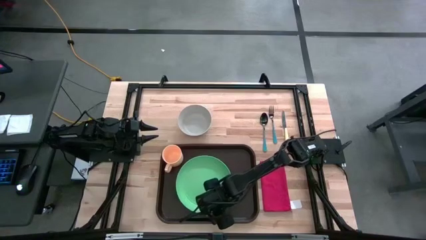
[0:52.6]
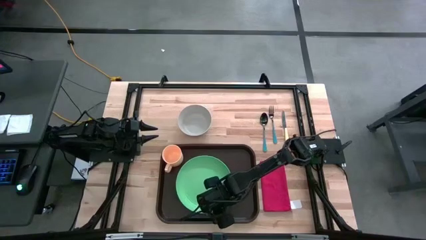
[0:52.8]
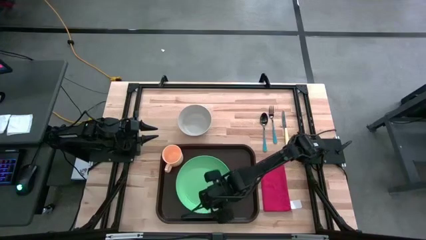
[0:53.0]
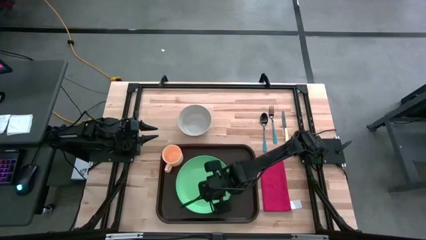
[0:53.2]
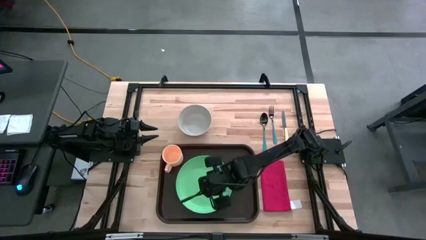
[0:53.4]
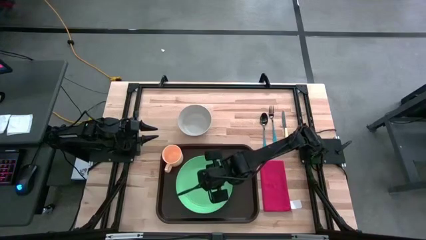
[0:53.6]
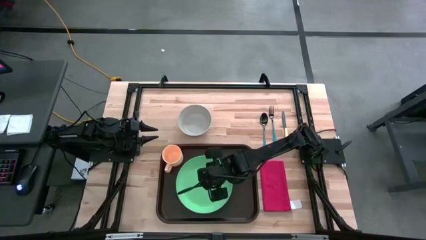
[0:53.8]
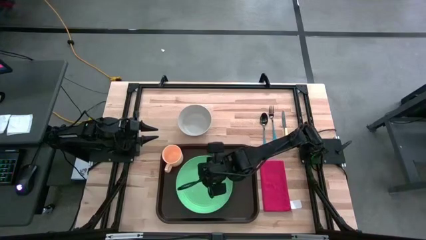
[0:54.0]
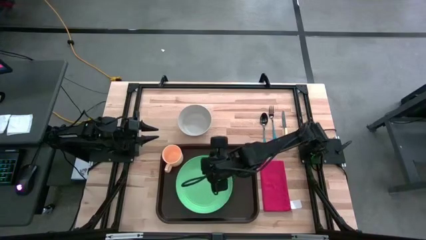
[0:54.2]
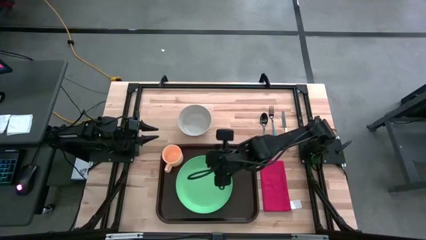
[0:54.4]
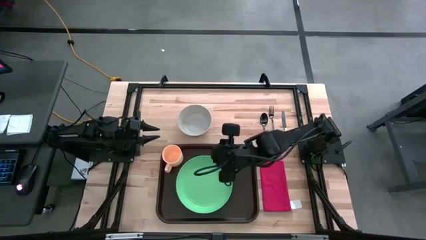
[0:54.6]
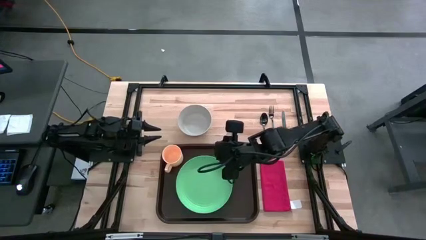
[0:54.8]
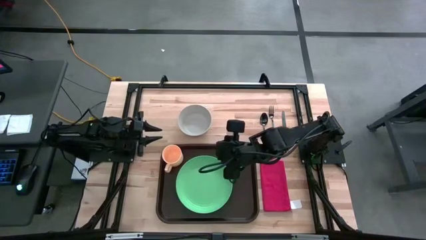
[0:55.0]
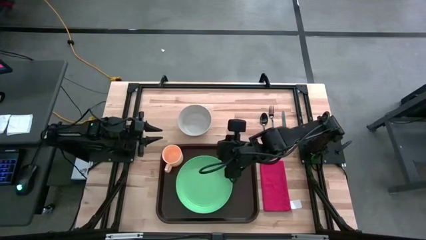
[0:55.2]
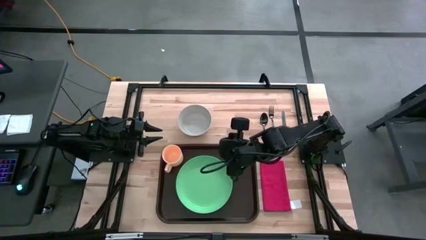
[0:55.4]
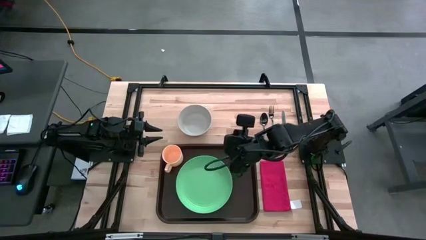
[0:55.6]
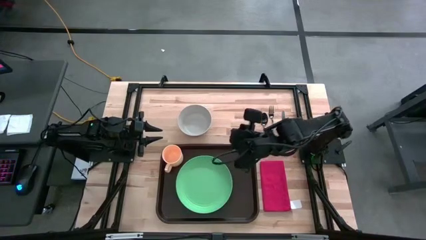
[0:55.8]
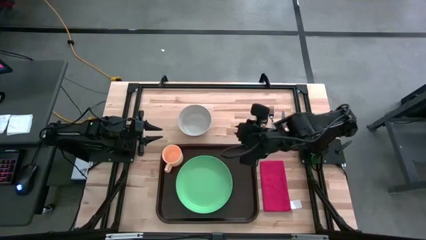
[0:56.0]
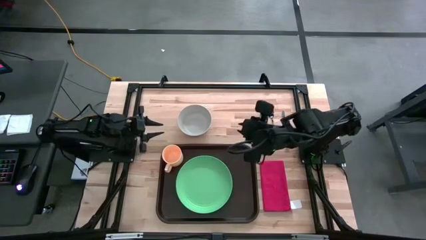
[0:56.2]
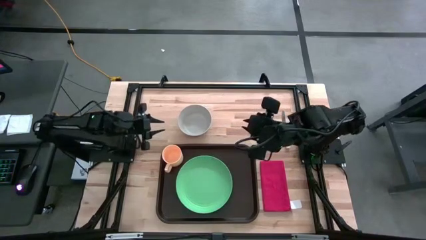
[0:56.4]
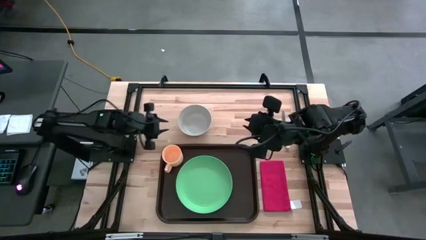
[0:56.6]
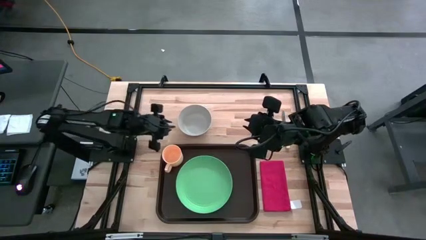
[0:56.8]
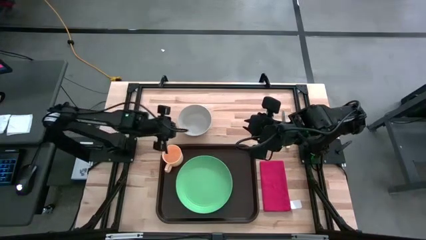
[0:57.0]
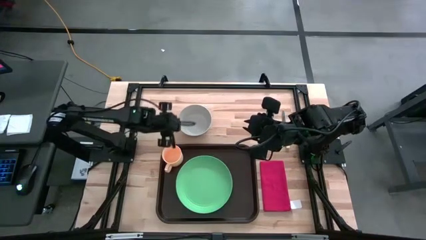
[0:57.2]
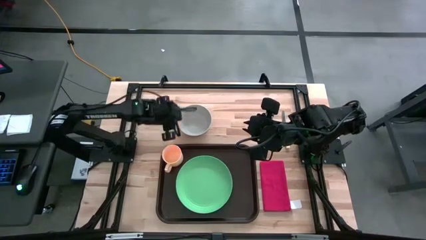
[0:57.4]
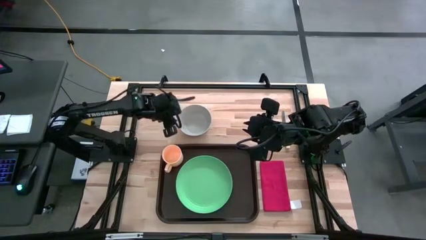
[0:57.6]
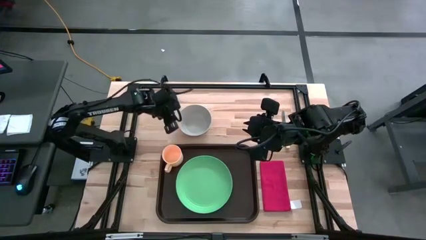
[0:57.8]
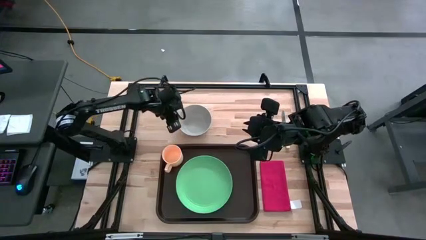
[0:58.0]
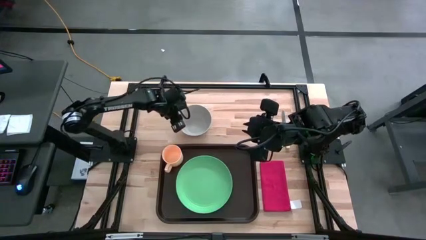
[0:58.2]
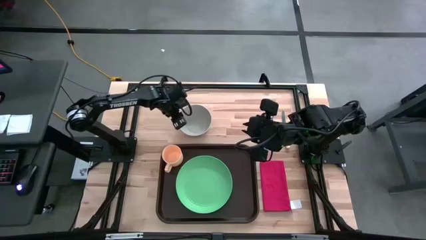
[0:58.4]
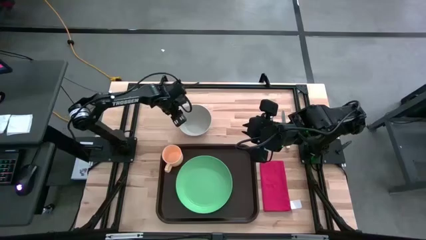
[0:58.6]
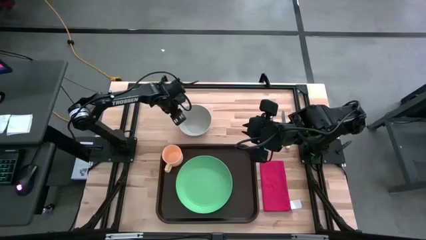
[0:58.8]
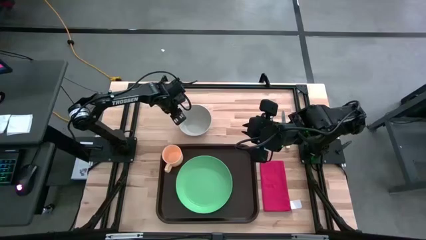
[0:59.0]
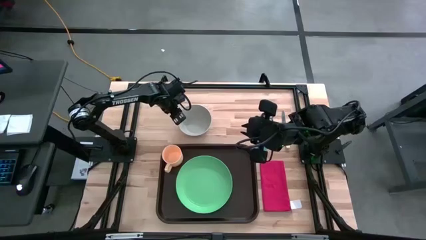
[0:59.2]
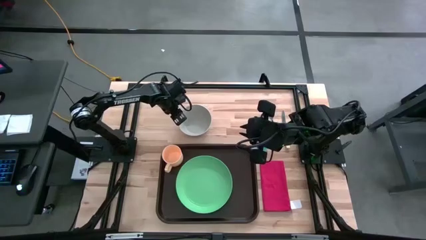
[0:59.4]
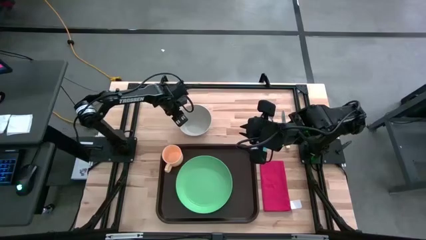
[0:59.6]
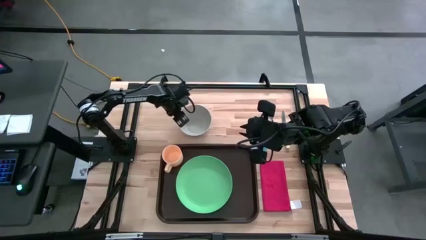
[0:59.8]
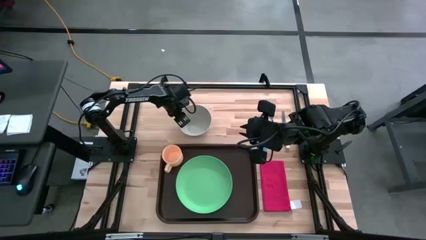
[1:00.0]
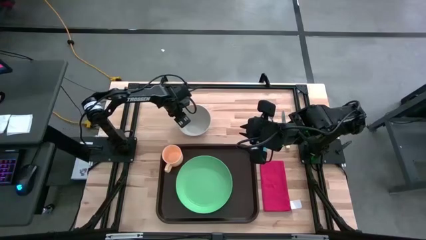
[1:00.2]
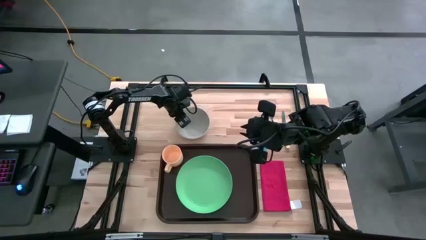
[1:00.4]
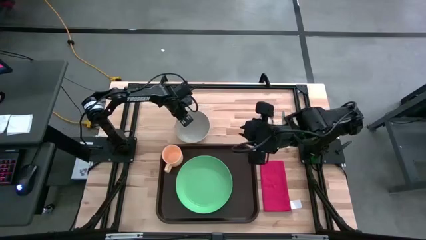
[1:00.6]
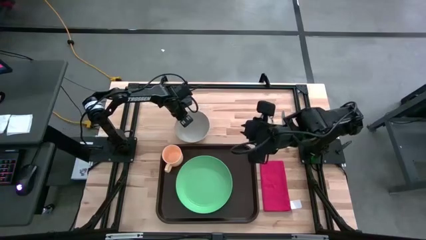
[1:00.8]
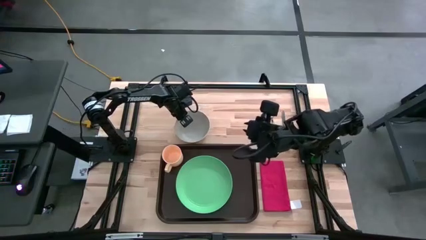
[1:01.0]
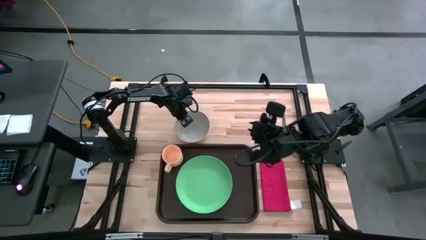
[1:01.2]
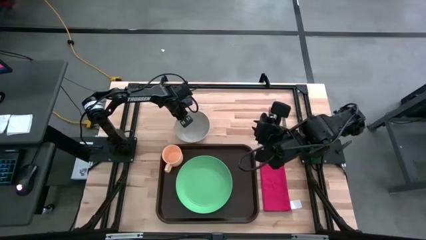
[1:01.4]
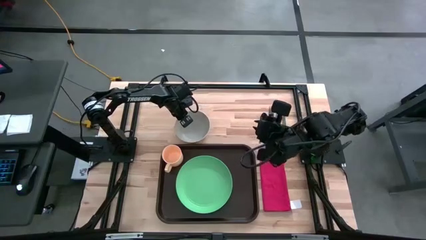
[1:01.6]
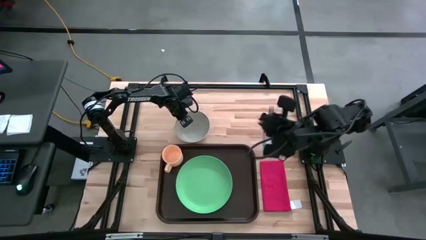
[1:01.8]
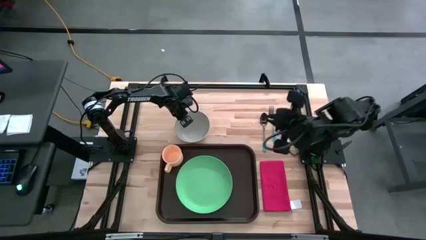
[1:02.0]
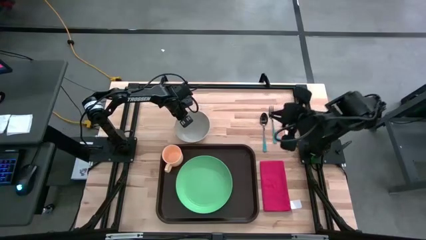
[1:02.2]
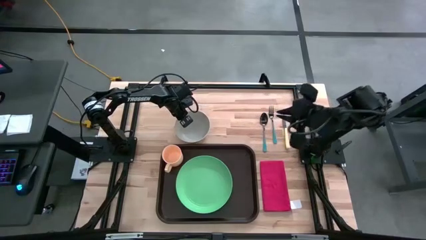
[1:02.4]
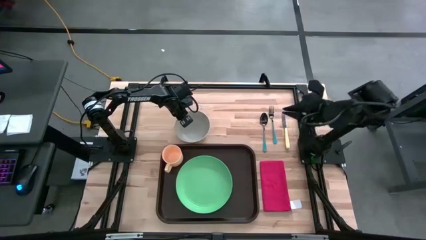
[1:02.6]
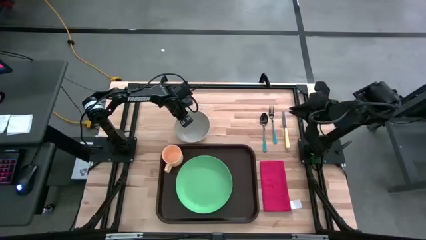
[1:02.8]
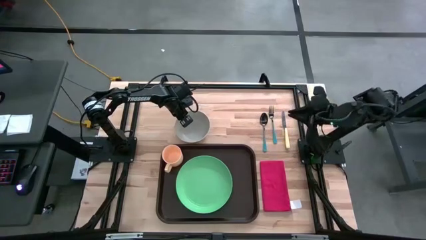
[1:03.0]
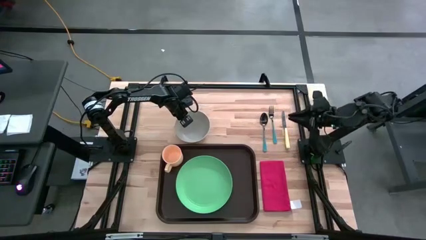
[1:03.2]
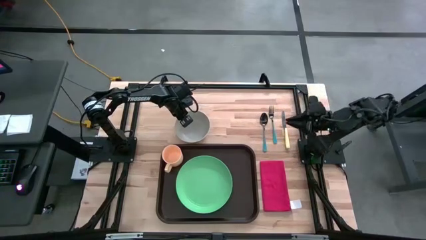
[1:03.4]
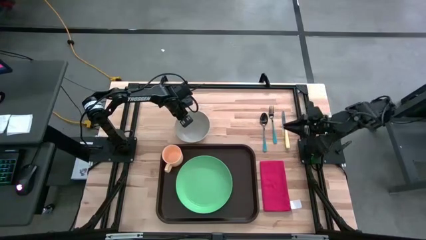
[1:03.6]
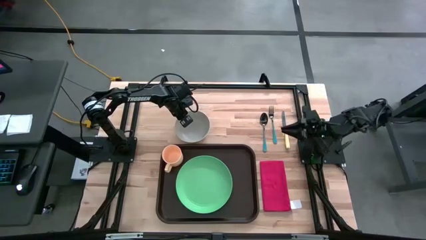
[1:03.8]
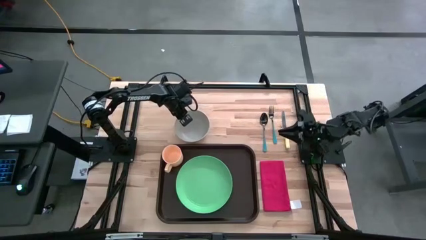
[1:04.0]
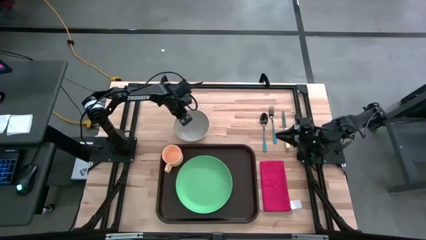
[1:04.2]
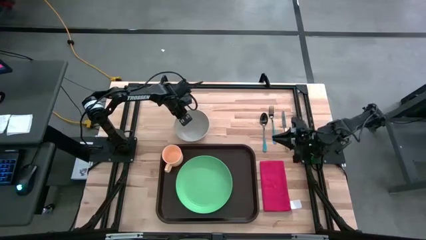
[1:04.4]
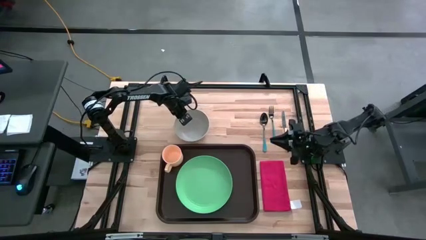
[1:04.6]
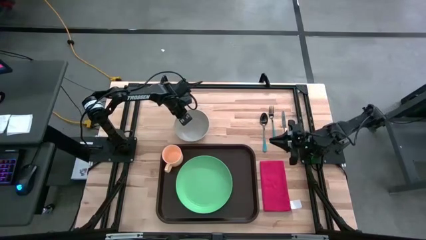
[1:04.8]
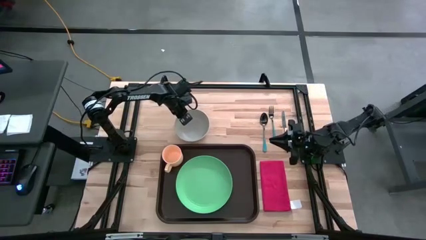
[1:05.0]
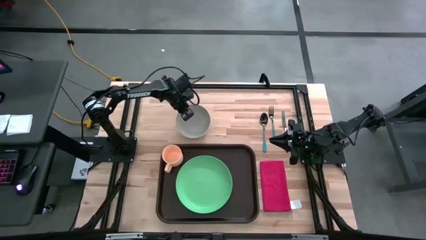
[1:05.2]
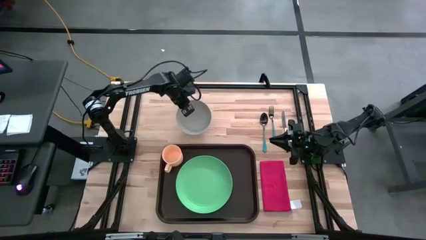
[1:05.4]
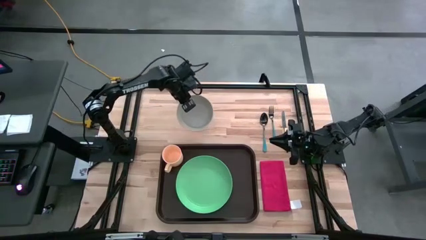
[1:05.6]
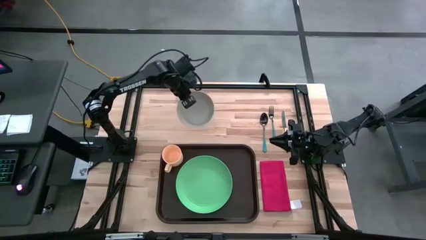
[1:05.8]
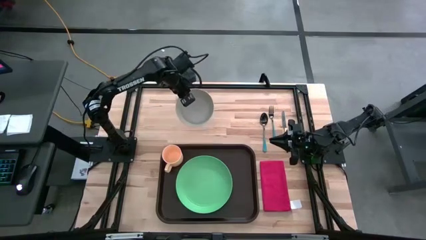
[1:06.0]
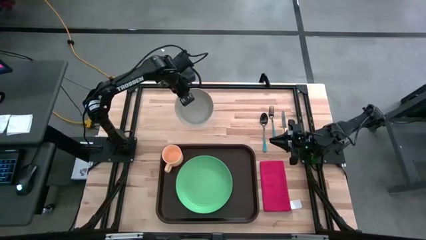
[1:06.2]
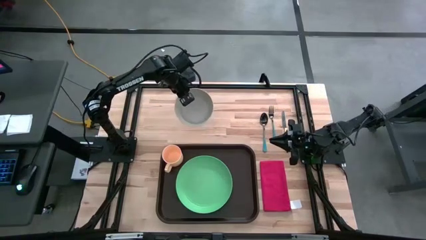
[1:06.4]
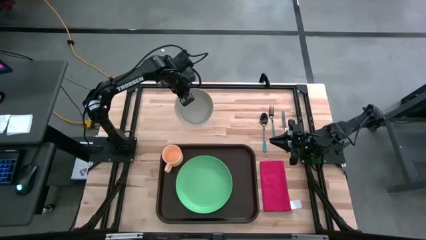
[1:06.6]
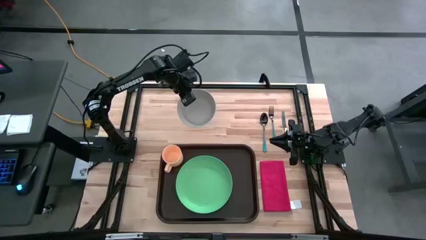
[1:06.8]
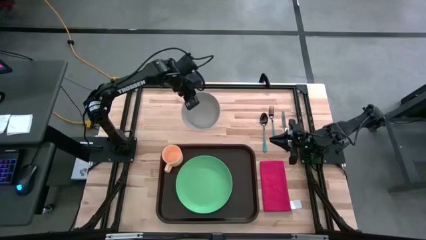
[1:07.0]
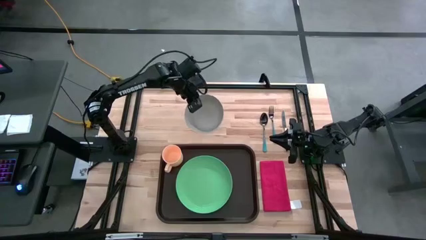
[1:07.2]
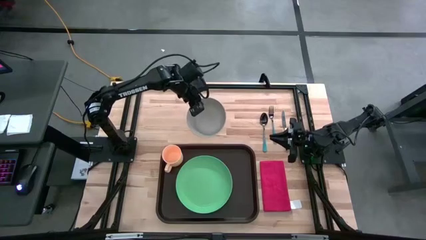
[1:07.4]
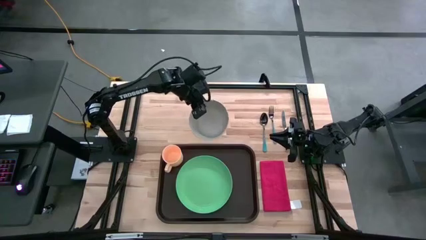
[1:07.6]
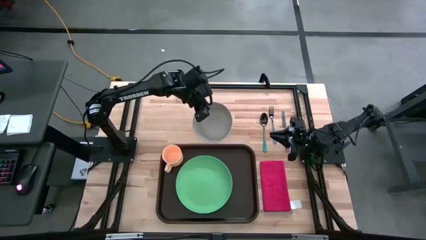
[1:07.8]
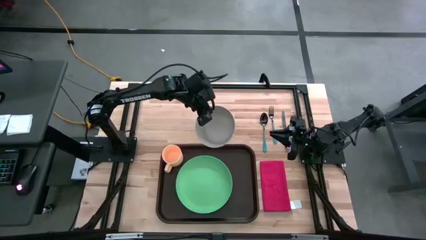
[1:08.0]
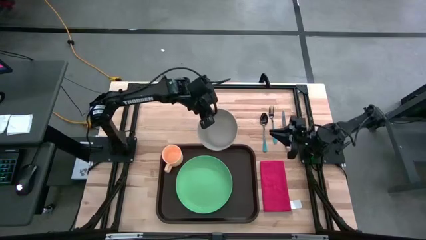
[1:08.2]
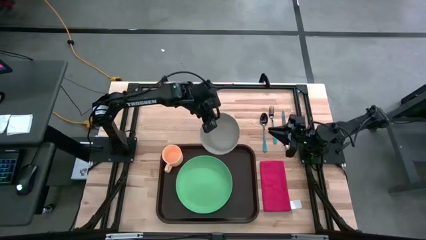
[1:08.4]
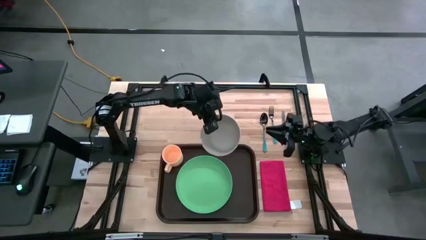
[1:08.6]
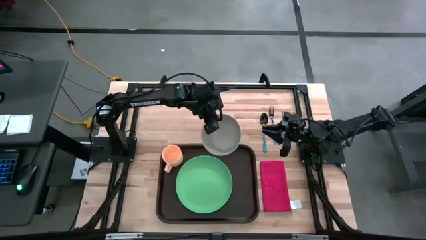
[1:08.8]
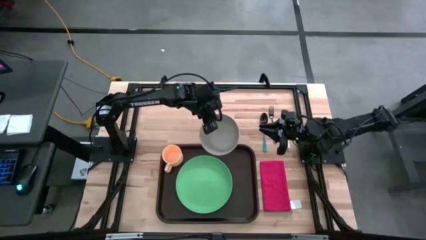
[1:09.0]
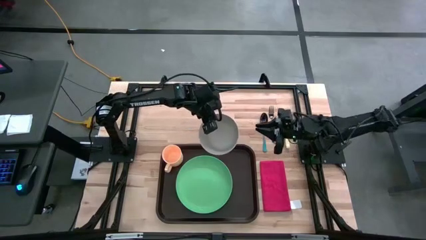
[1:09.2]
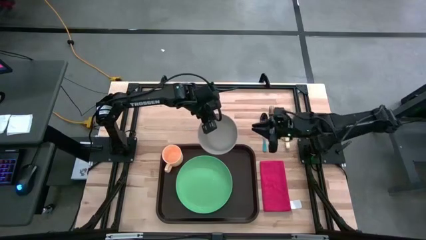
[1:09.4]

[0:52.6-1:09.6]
Task: Set up tray
Put the gray bowl on top of the plate on the serving tray
